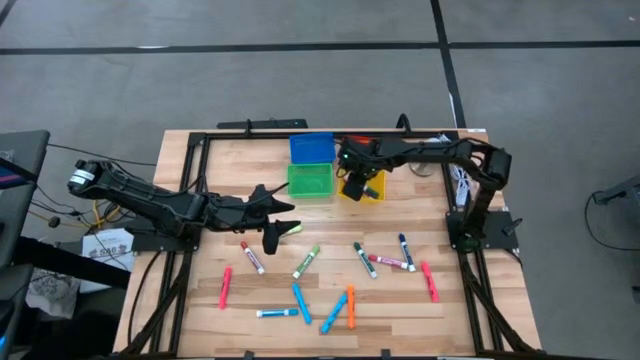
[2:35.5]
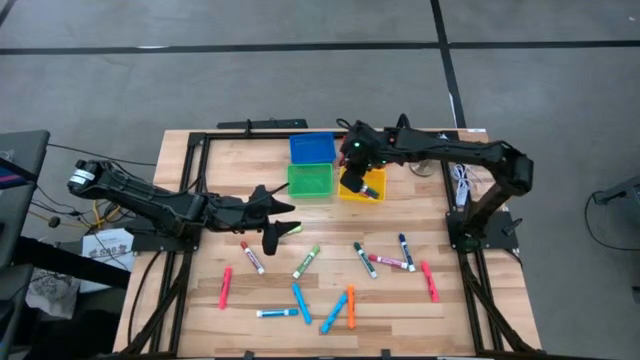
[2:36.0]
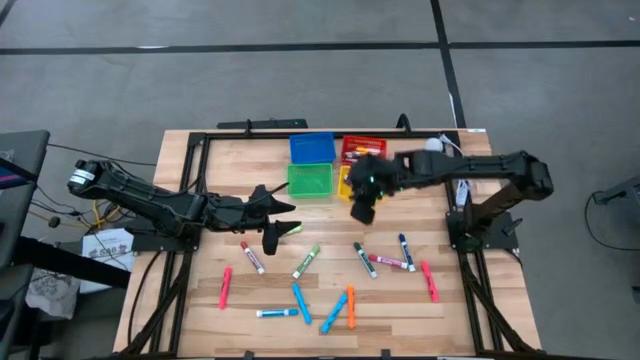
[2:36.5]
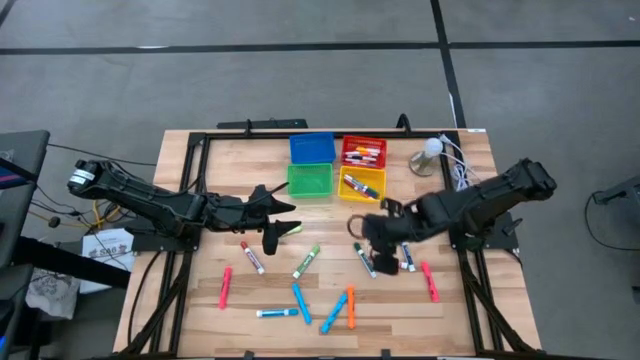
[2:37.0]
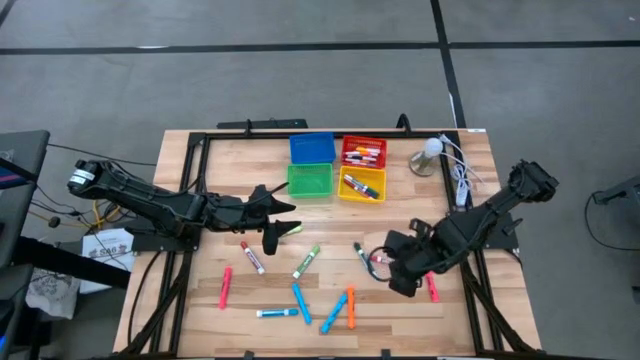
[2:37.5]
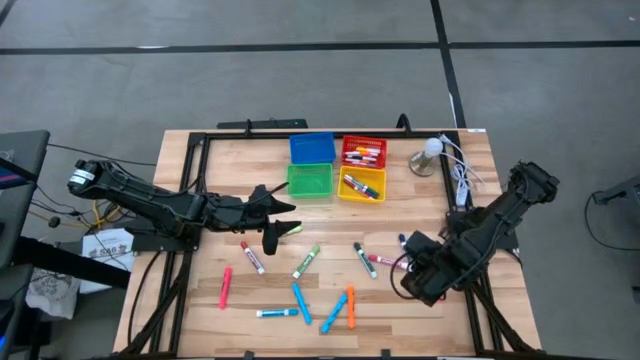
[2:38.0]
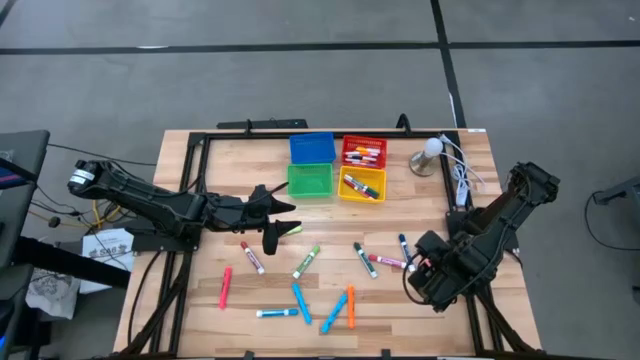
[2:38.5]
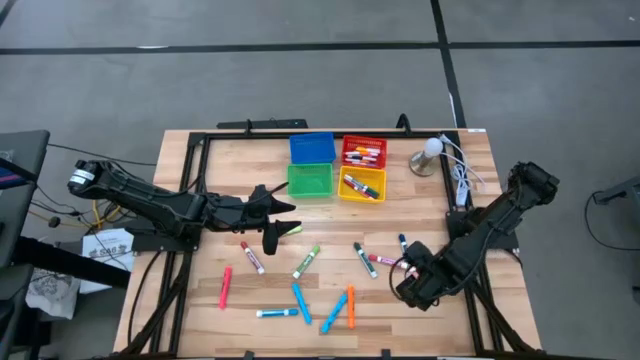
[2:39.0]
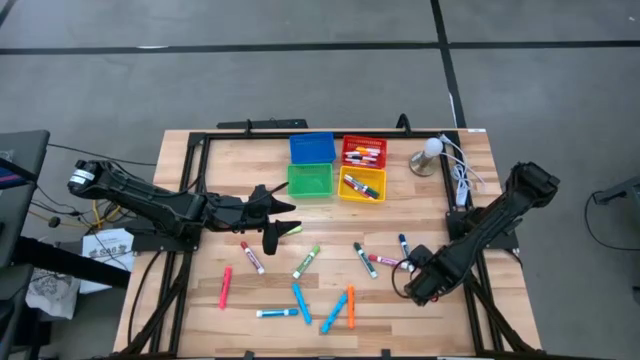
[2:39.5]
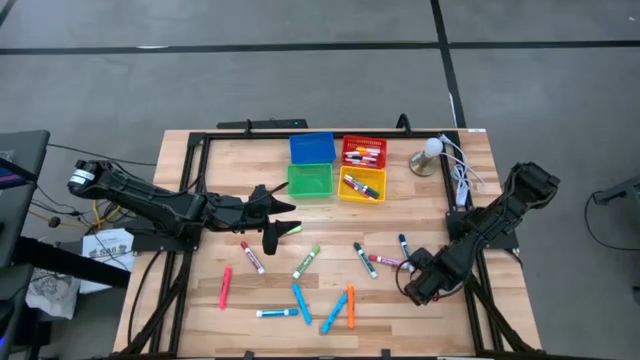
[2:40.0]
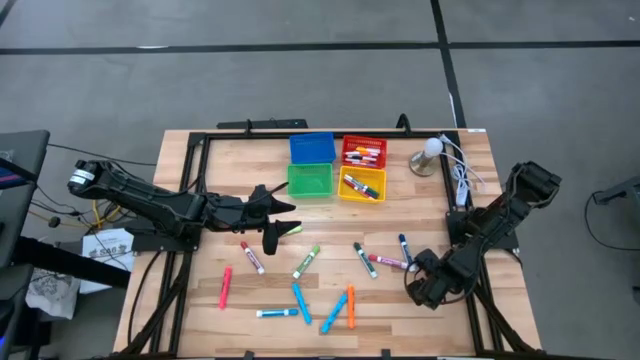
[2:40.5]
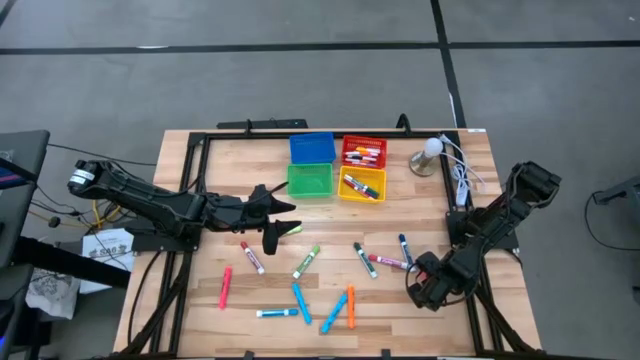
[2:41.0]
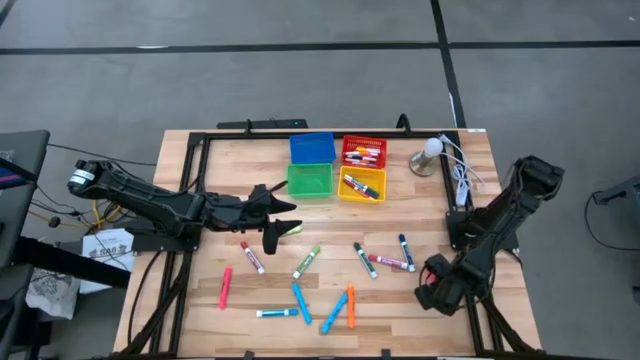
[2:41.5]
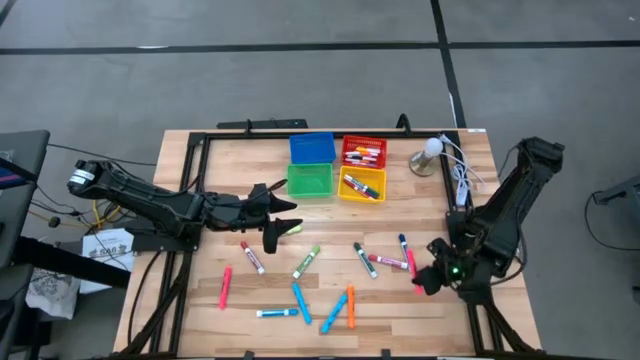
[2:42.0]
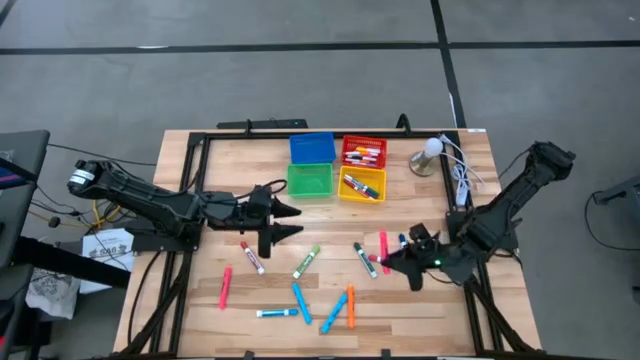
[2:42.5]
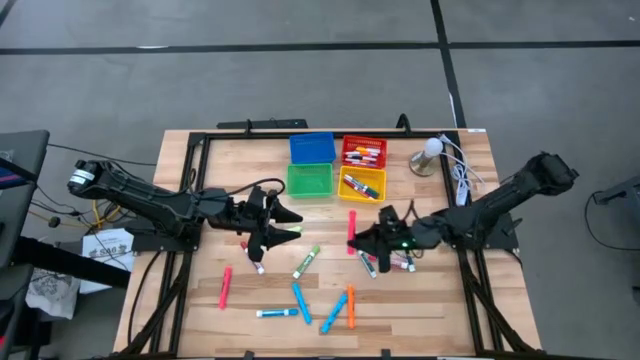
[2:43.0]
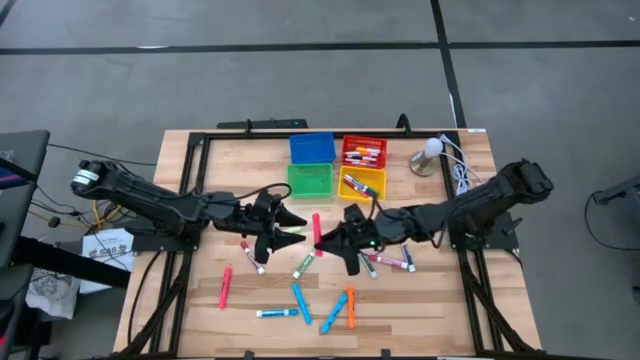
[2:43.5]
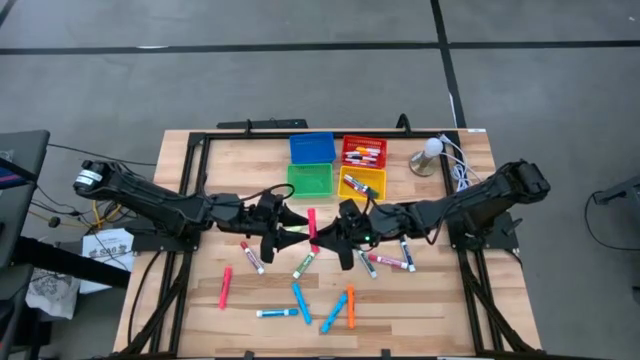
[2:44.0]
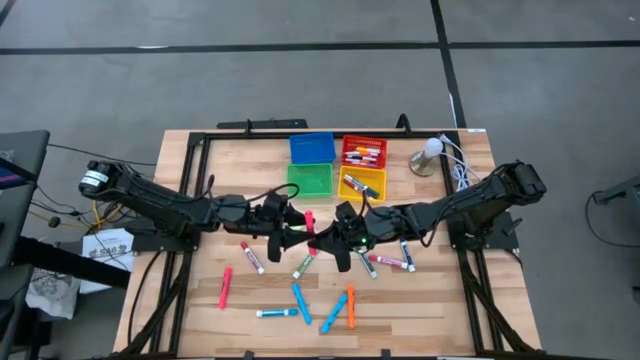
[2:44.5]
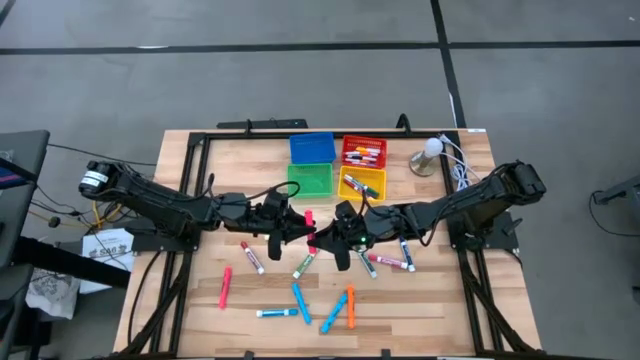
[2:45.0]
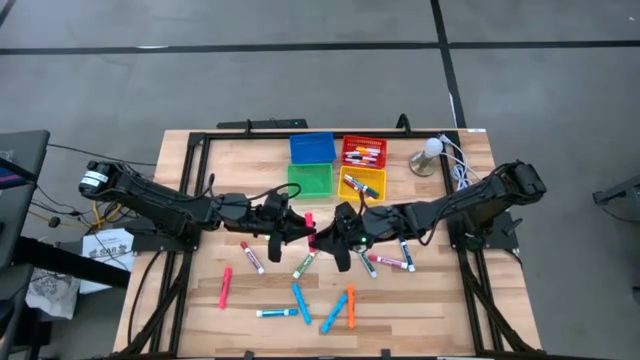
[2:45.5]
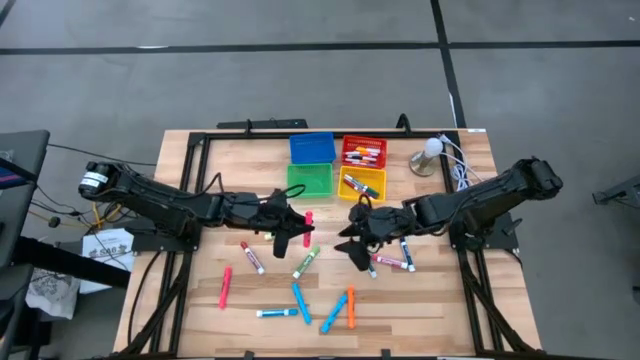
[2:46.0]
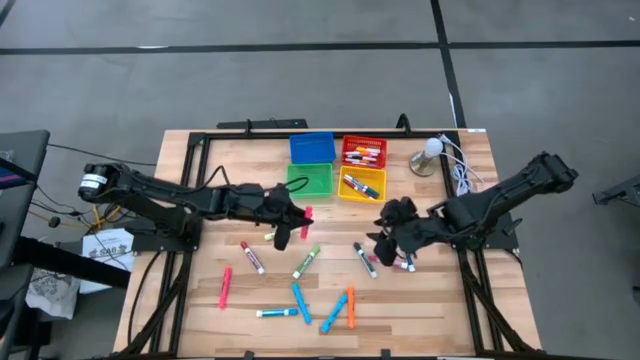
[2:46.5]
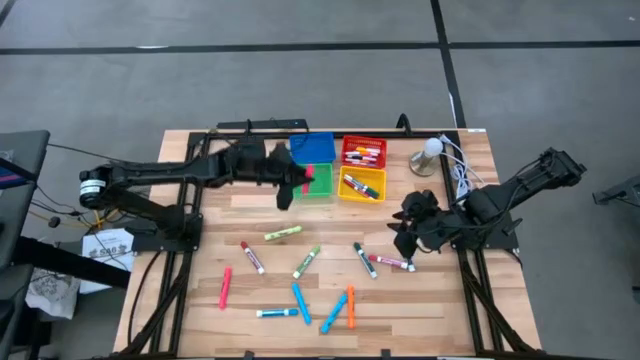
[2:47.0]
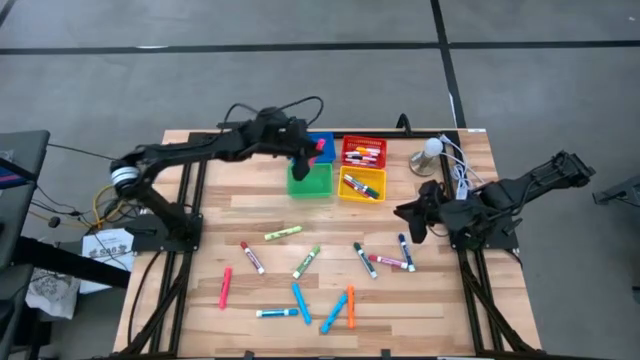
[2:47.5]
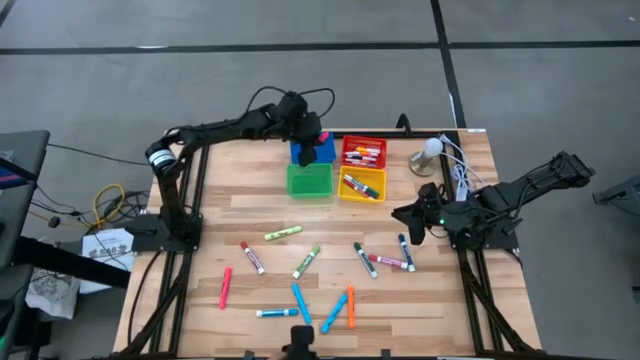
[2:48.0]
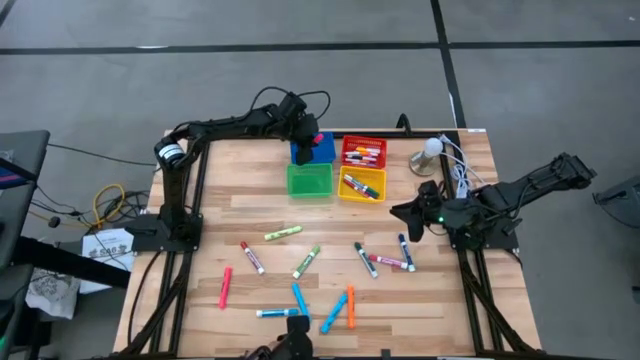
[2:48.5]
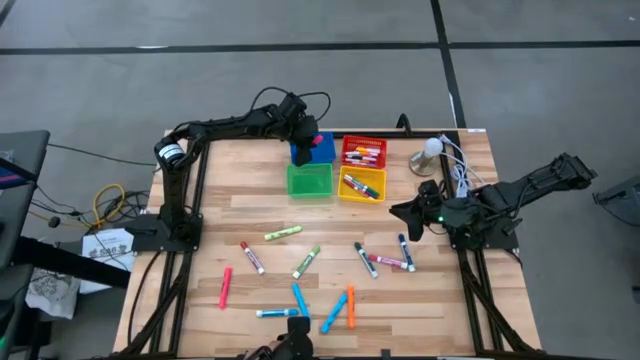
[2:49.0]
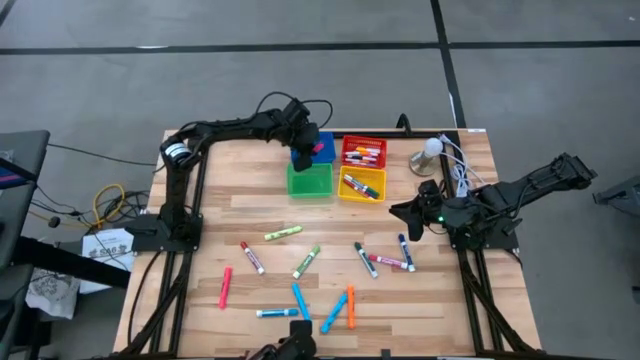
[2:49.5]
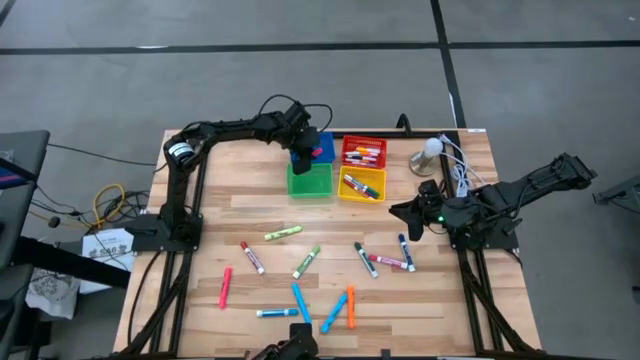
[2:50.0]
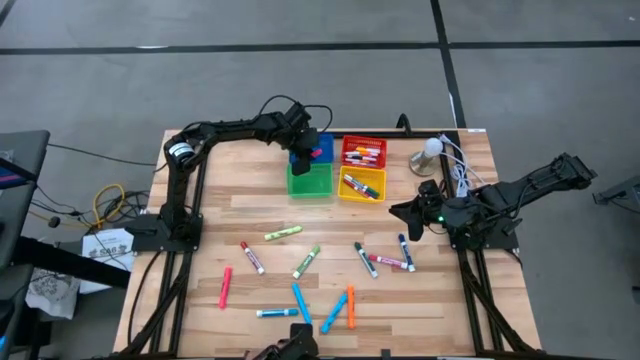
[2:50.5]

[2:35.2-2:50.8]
Task: Pick & Place Markers
Put the right pink highlighter into the blue bin

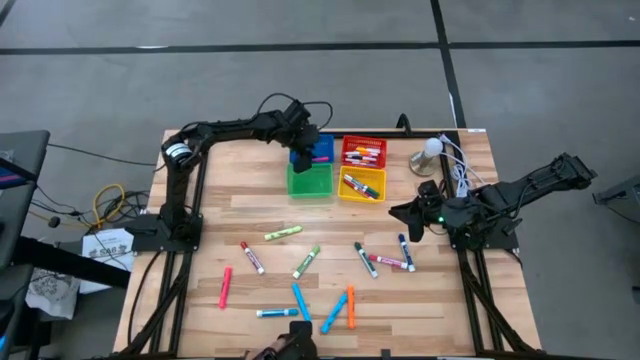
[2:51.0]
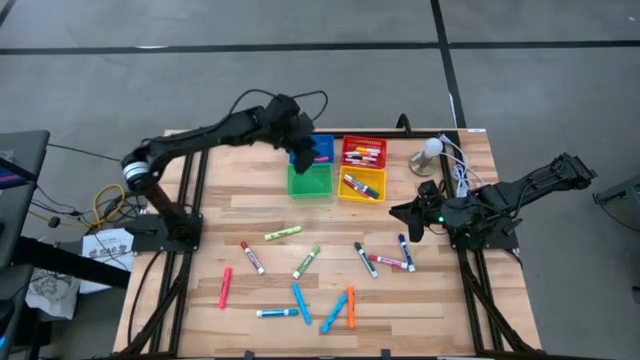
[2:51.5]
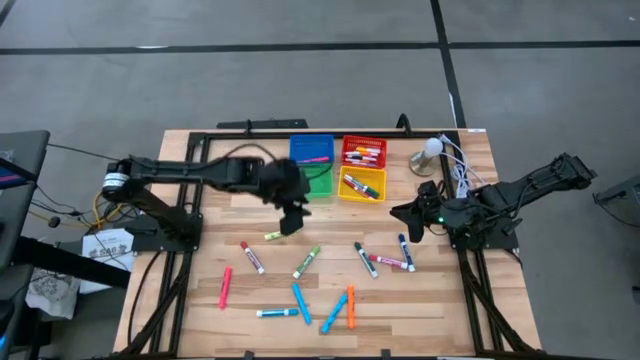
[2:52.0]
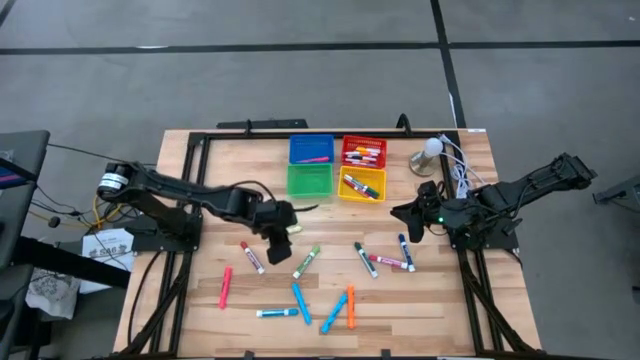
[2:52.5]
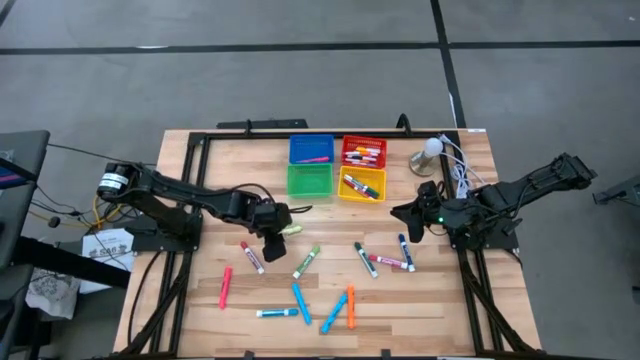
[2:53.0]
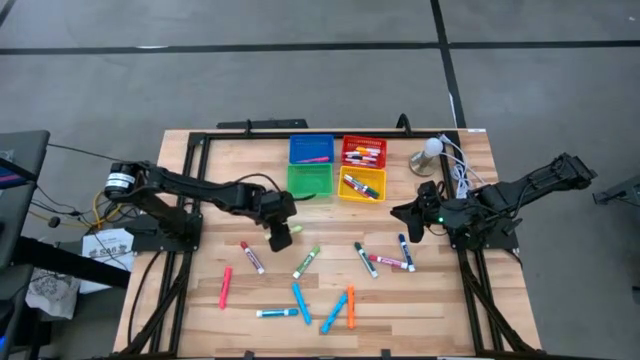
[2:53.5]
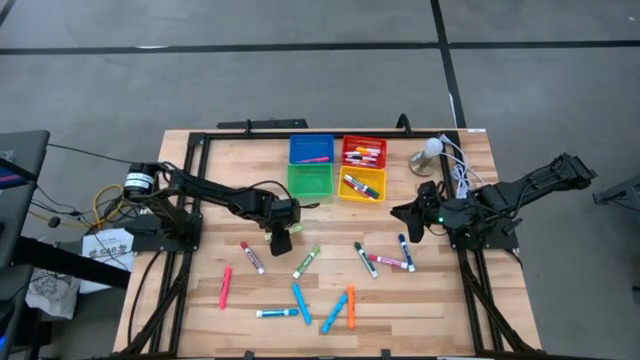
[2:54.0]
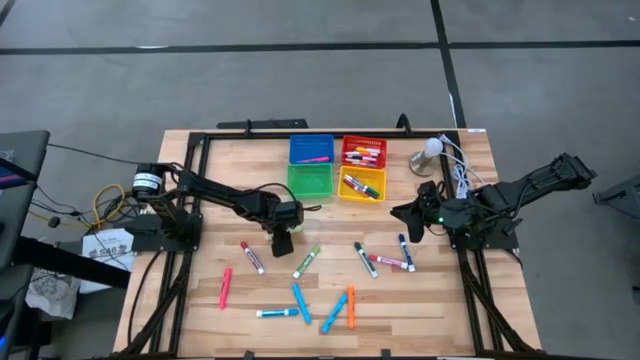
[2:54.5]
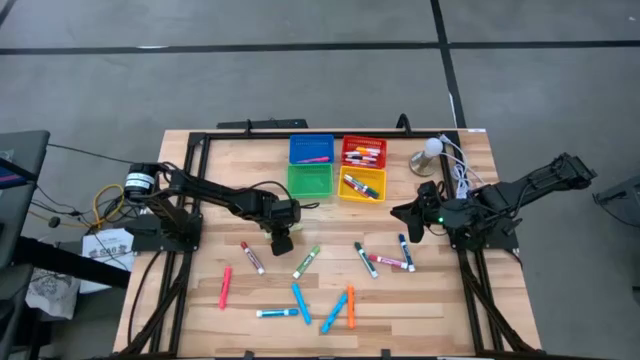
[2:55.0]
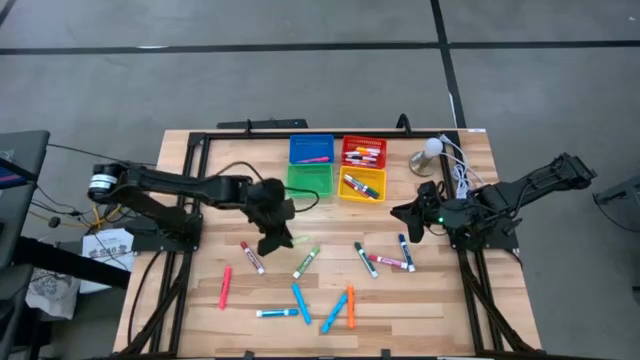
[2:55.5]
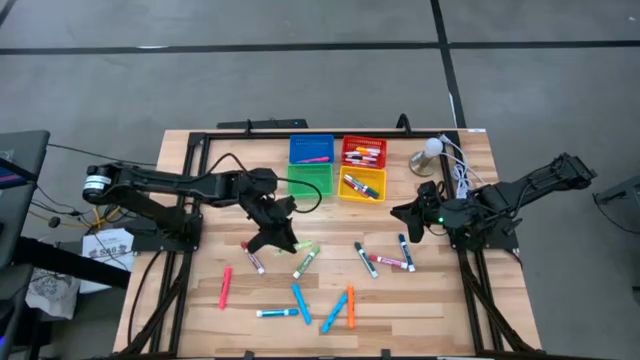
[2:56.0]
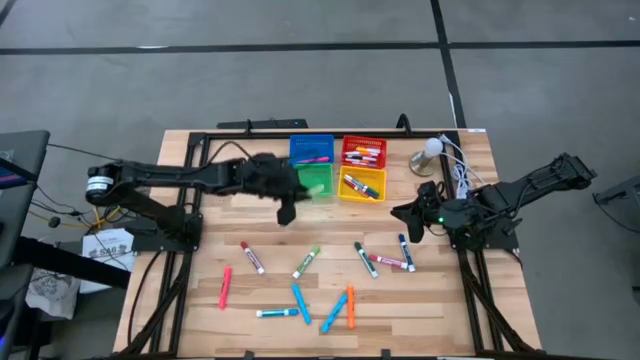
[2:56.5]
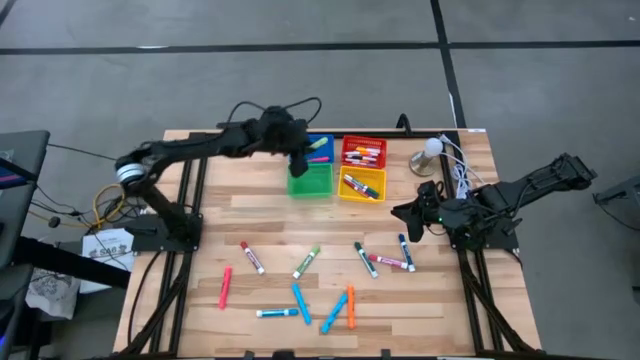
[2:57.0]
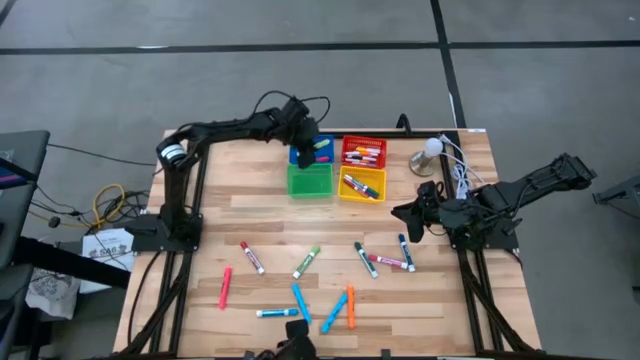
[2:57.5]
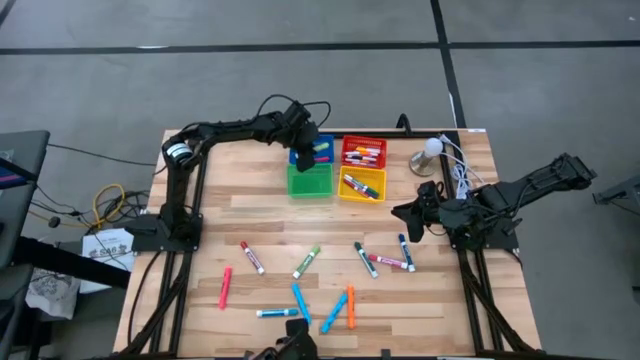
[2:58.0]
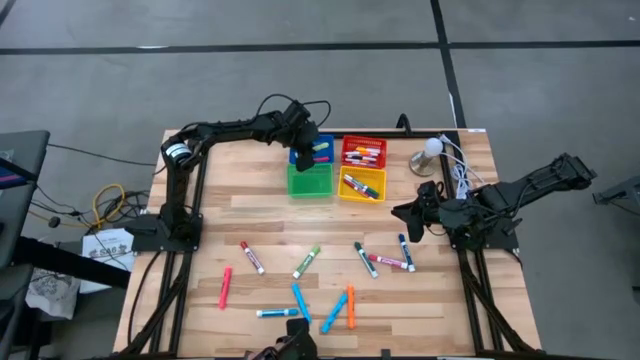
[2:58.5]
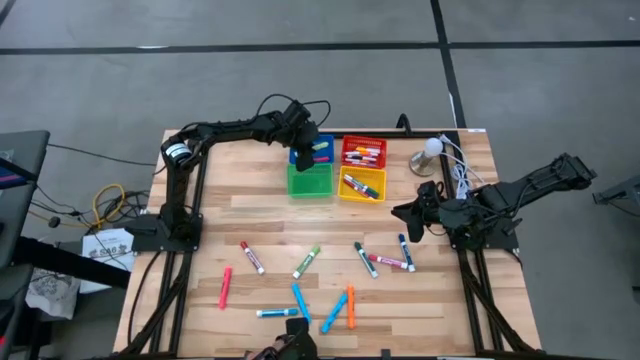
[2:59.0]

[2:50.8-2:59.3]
Put the light green highlighter into the blue bin
